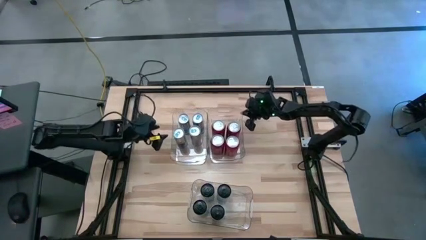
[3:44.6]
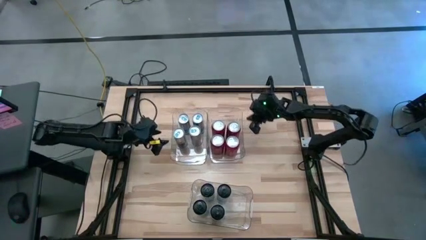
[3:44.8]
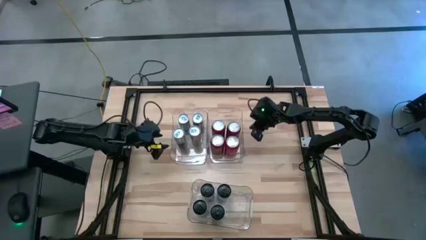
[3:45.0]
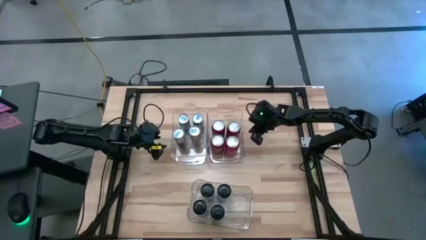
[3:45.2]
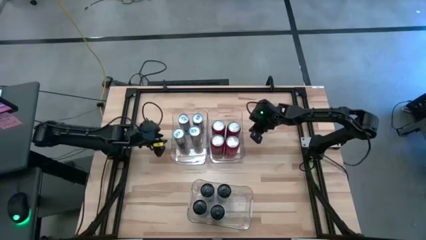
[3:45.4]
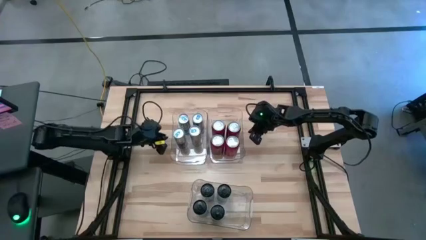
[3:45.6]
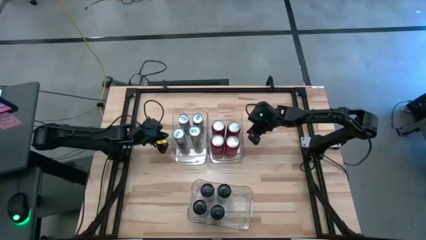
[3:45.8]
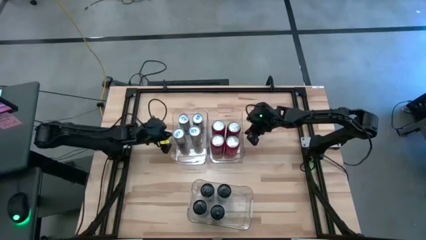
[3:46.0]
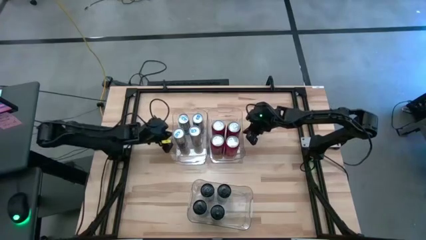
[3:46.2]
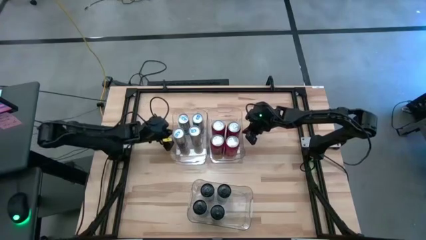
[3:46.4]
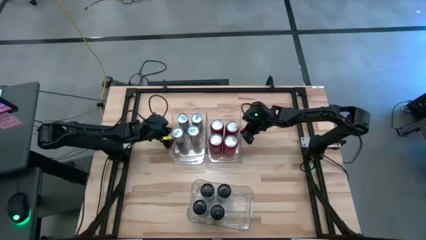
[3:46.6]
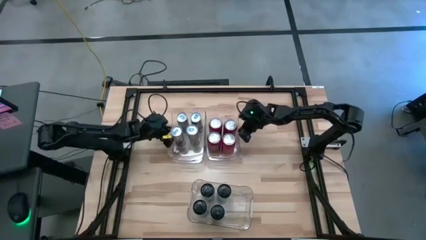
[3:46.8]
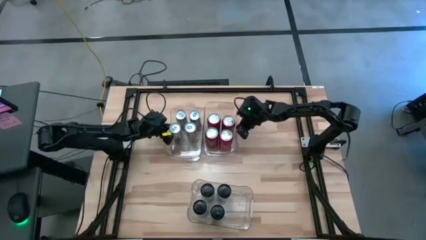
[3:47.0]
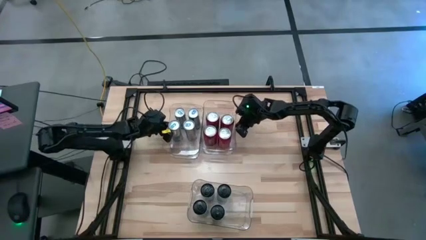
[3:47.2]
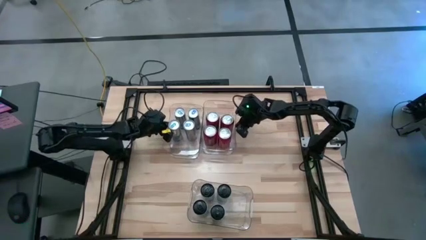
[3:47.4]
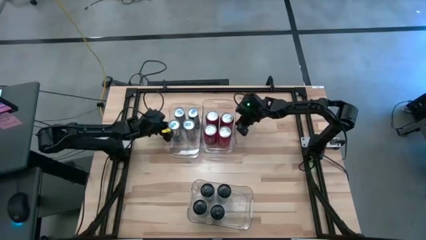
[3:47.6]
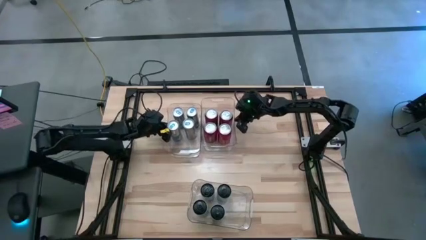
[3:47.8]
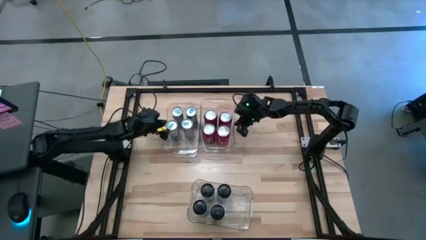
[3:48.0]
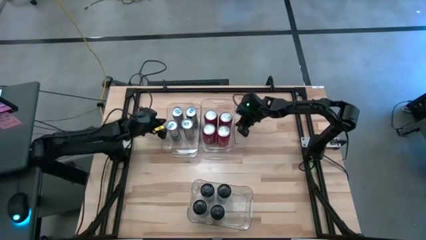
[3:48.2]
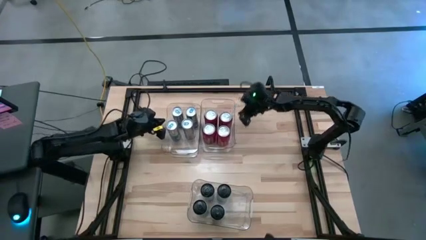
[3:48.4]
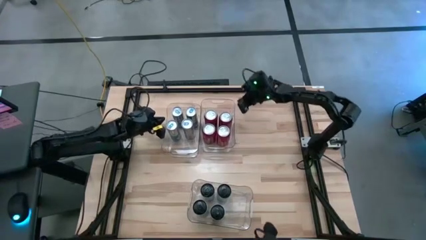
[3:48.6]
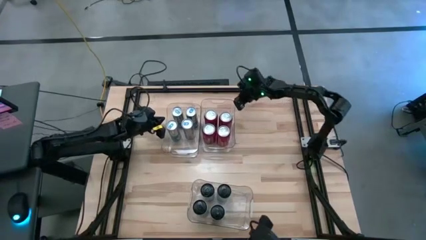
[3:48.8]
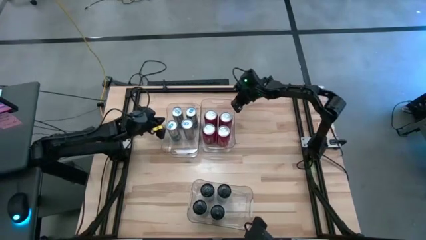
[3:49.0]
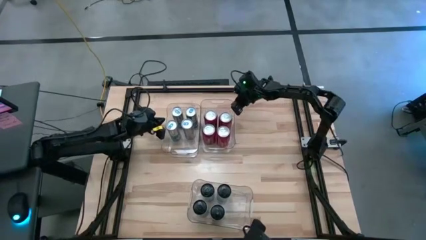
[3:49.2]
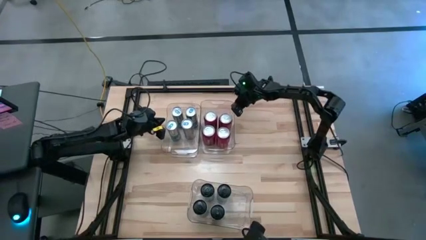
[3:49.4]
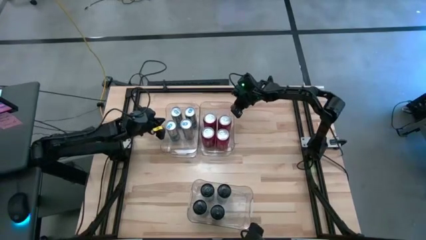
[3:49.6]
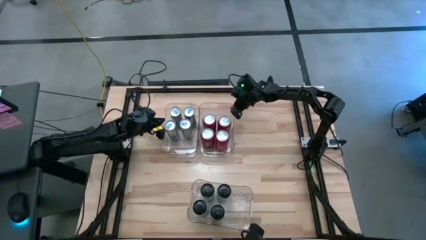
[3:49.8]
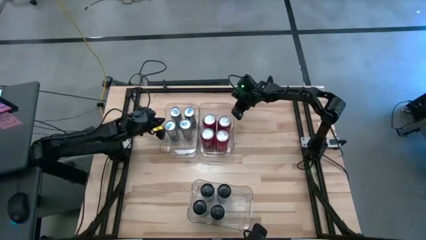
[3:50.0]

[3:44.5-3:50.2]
Task: Sort soda cans
Adjust the top left and top right transparent bins

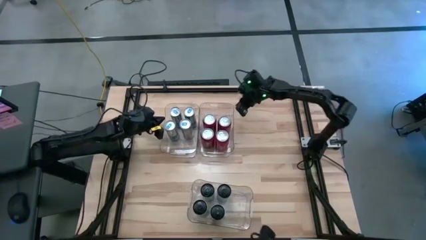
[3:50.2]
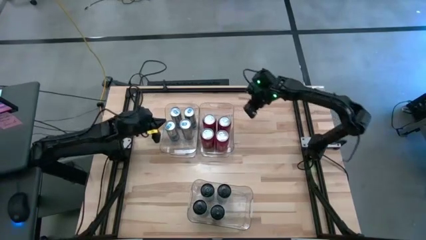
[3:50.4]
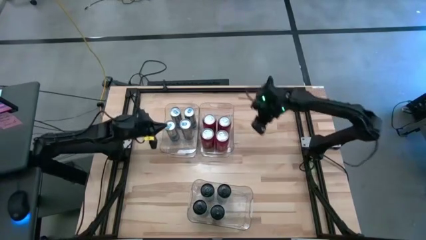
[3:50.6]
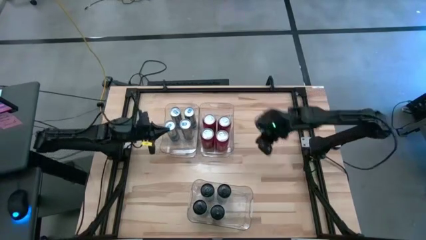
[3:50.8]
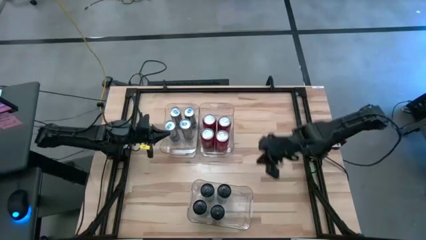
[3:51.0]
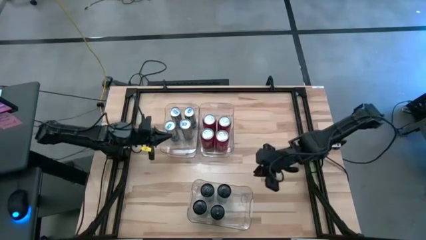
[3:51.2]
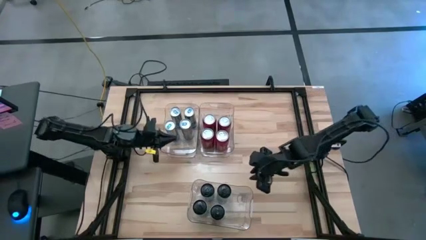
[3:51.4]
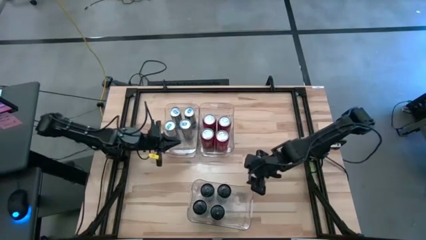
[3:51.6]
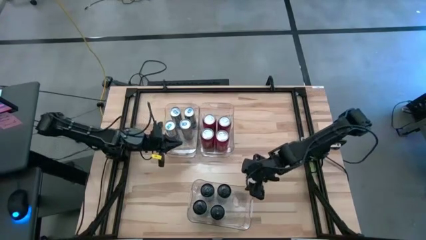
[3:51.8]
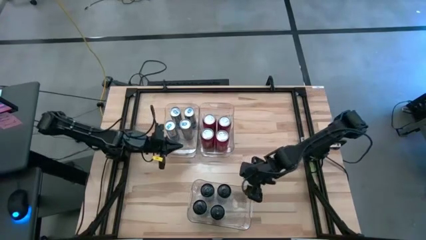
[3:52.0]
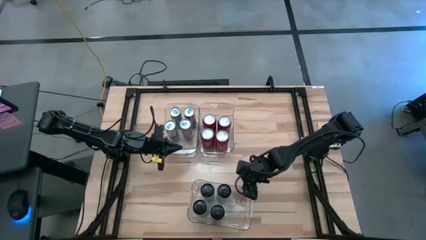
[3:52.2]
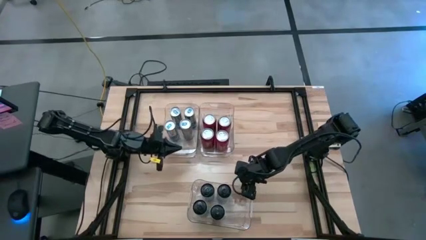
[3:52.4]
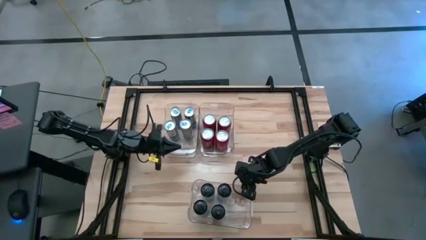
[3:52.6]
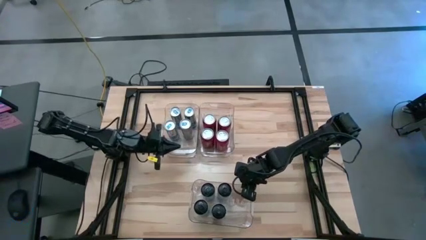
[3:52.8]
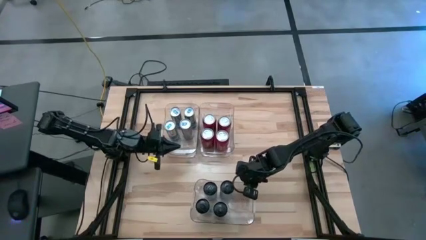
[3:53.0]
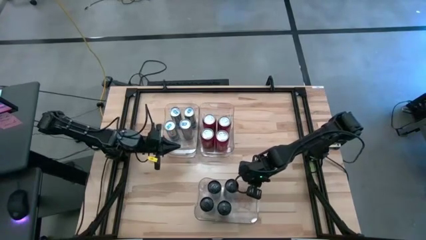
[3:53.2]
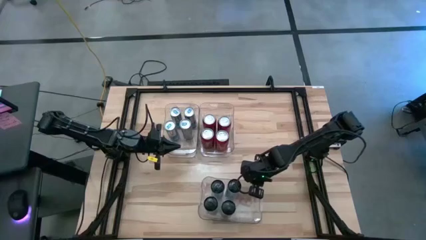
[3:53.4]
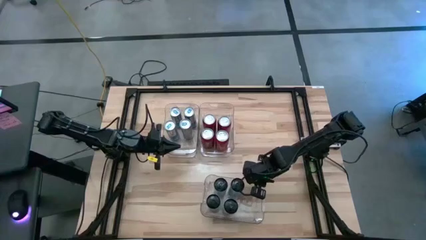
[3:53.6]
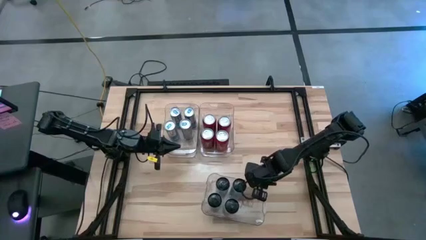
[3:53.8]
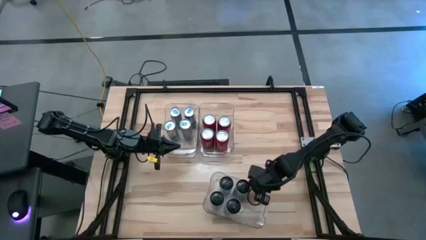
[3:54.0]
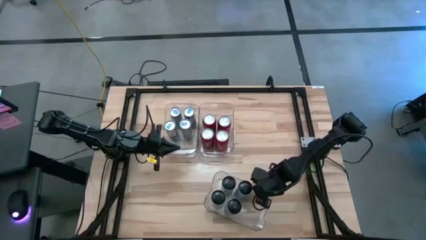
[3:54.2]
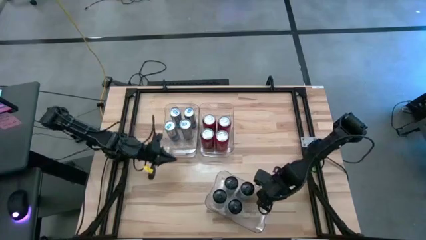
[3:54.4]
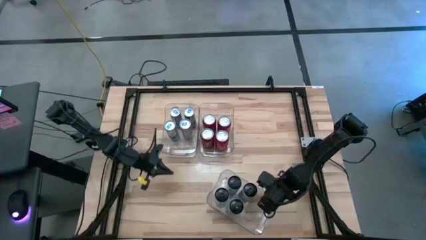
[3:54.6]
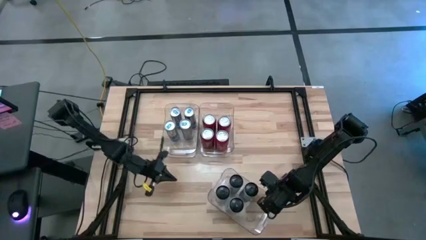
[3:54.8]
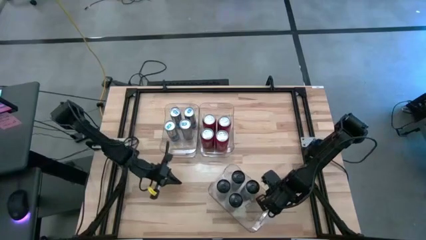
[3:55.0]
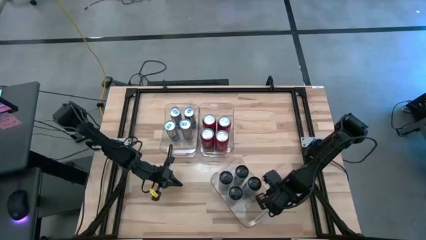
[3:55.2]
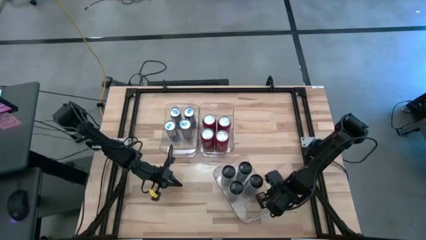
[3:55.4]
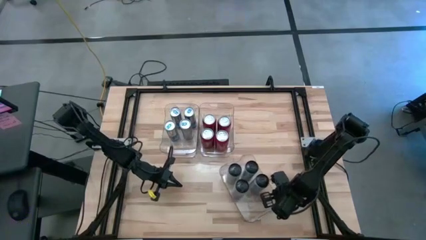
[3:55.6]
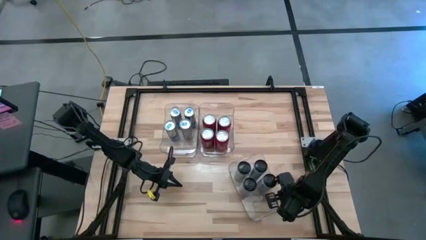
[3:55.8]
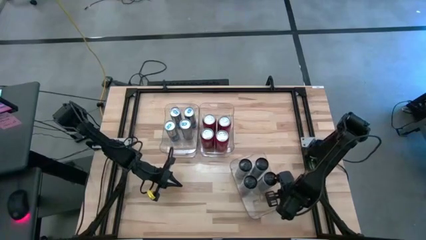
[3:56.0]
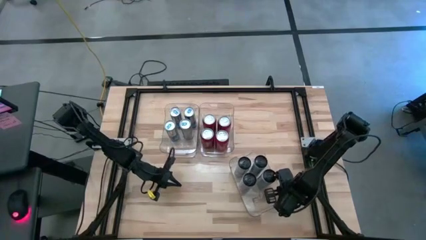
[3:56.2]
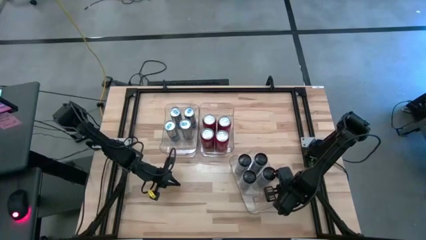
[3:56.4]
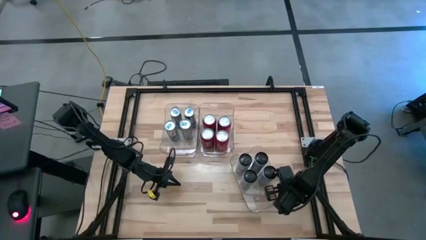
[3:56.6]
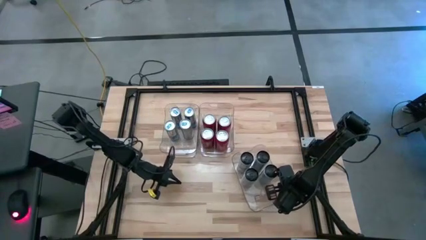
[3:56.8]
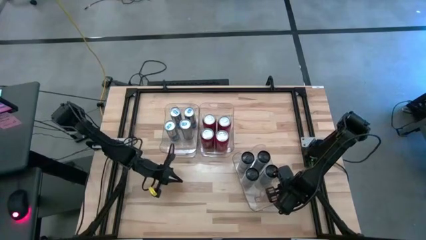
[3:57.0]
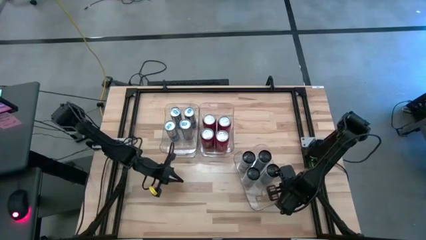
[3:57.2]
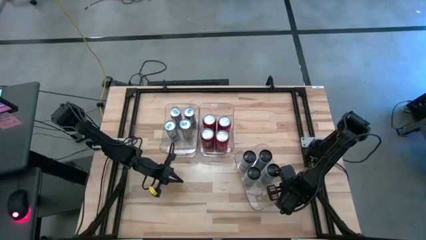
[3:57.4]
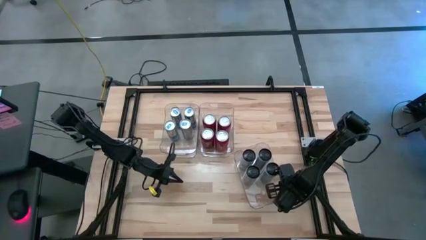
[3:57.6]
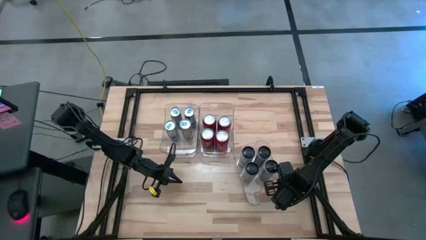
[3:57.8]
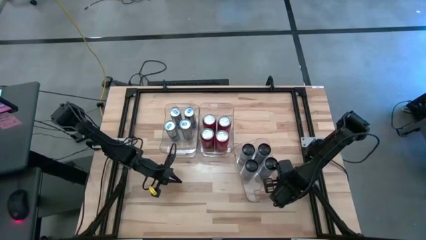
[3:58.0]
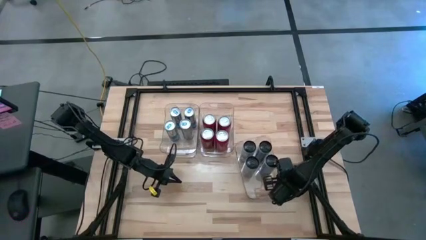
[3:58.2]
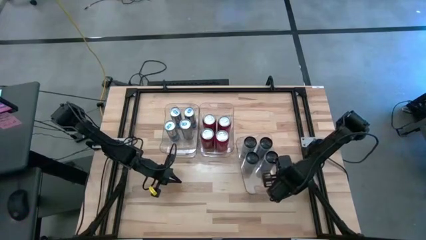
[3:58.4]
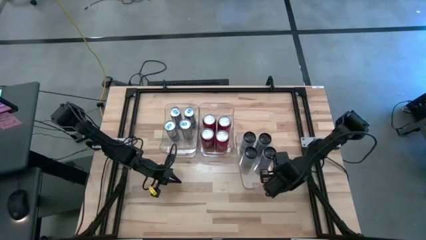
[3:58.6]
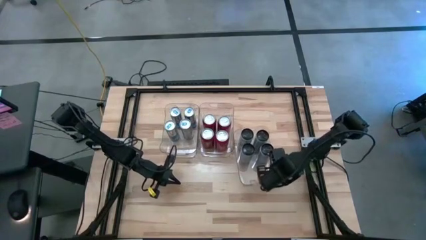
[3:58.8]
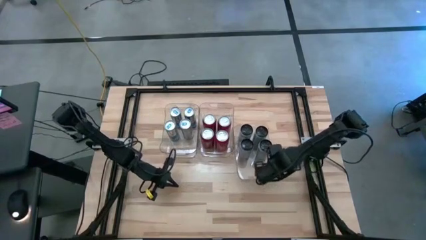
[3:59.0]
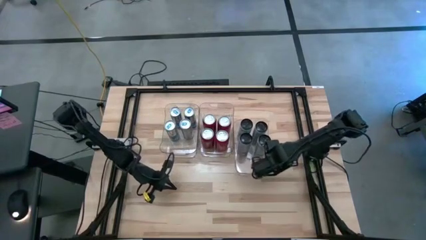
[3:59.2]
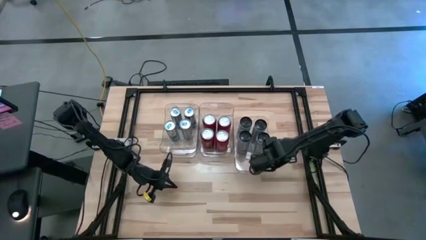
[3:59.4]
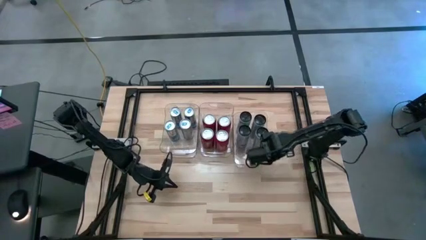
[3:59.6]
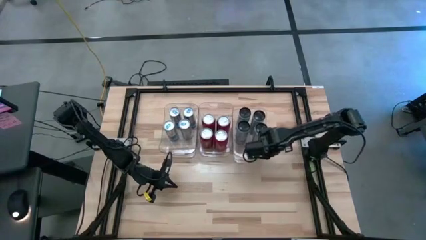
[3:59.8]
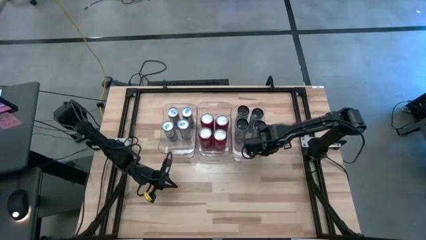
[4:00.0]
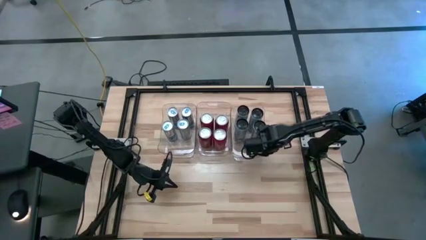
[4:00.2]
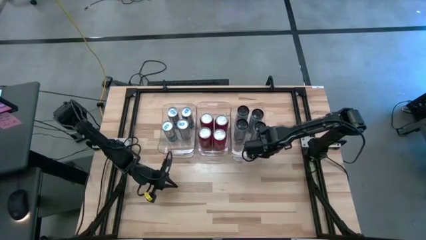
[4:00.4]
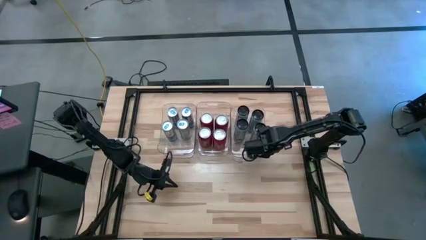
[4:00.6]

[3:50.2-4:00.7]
Move the transparent bin to the center of the table
